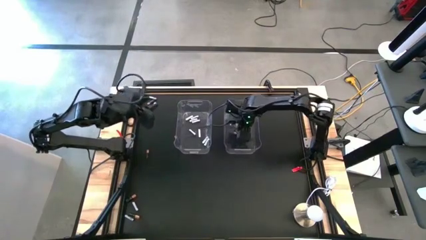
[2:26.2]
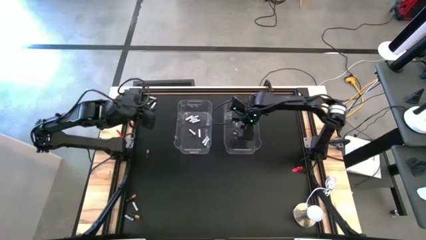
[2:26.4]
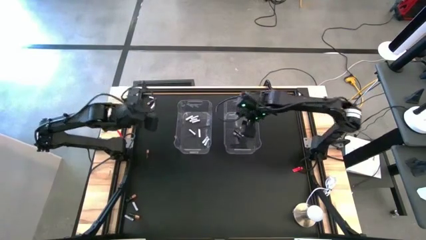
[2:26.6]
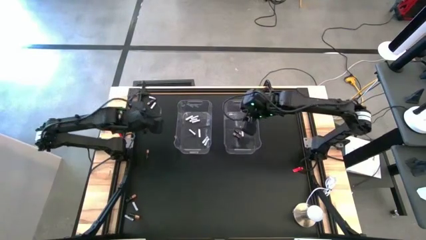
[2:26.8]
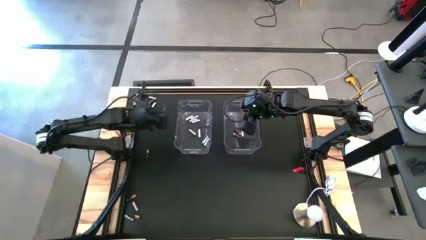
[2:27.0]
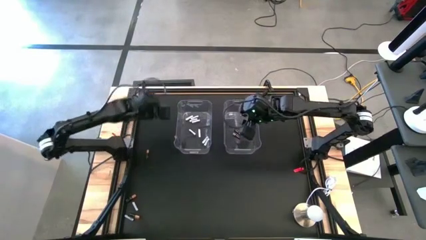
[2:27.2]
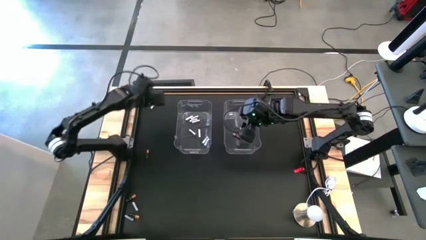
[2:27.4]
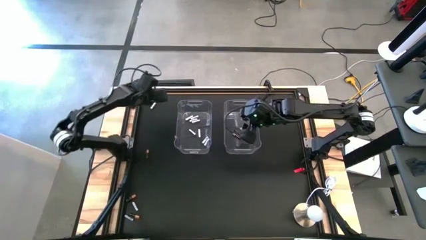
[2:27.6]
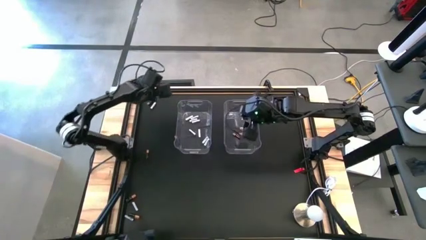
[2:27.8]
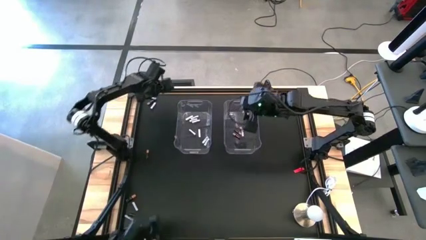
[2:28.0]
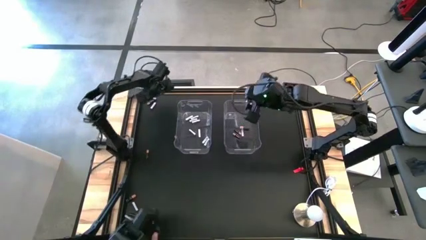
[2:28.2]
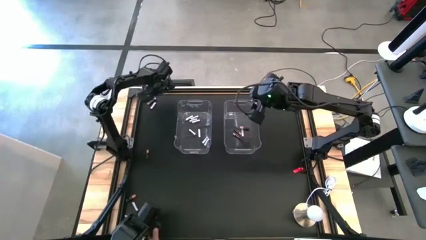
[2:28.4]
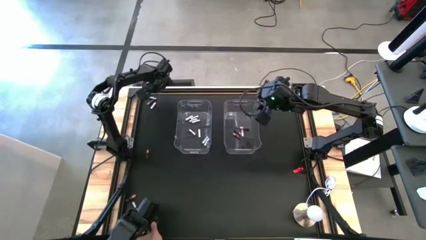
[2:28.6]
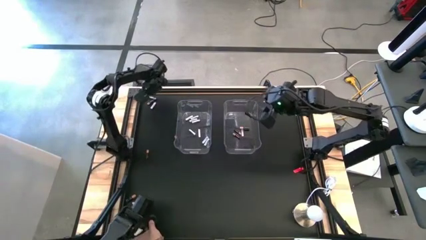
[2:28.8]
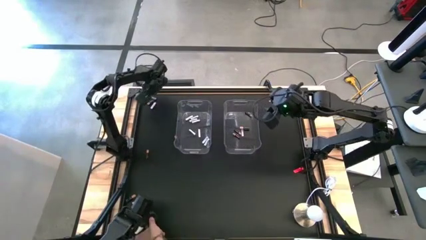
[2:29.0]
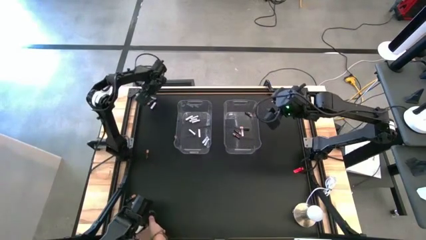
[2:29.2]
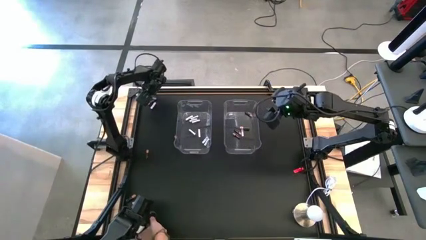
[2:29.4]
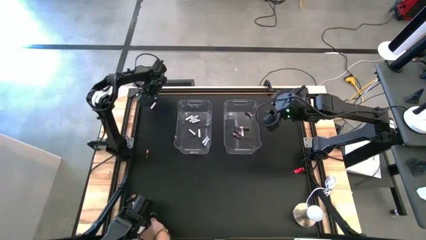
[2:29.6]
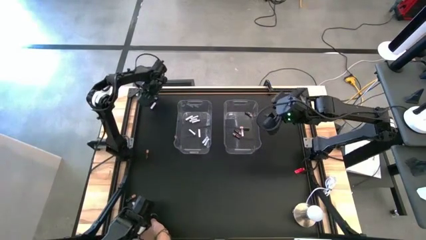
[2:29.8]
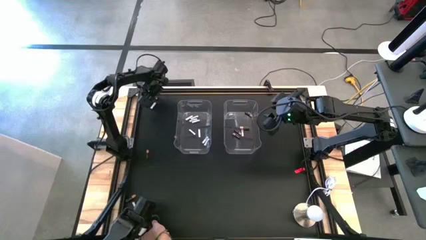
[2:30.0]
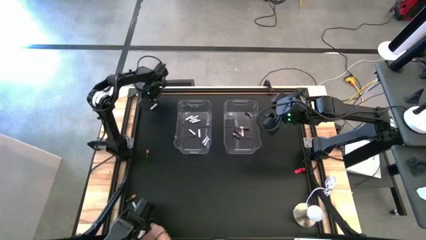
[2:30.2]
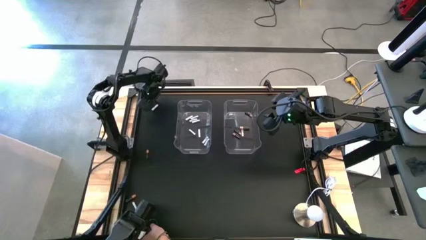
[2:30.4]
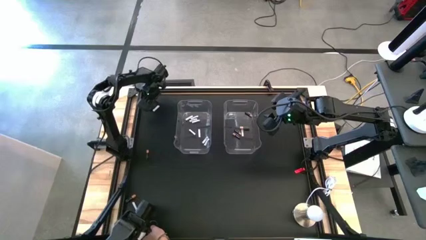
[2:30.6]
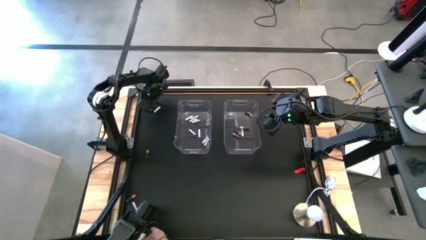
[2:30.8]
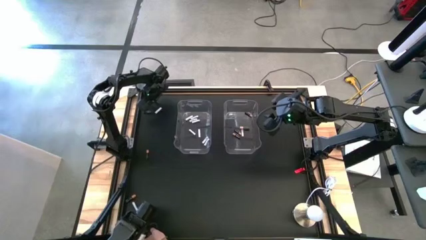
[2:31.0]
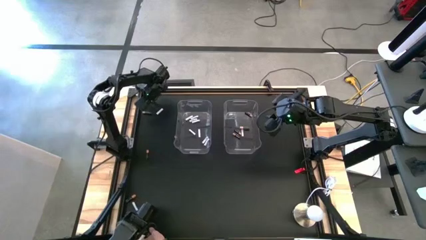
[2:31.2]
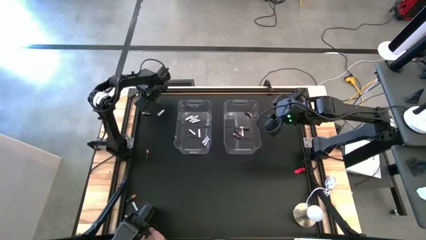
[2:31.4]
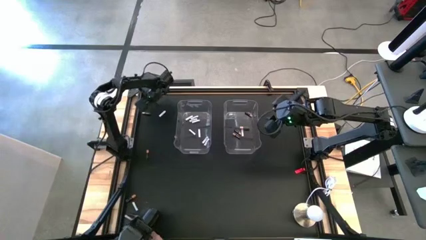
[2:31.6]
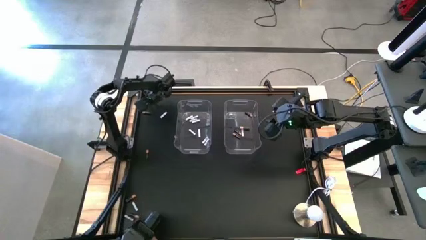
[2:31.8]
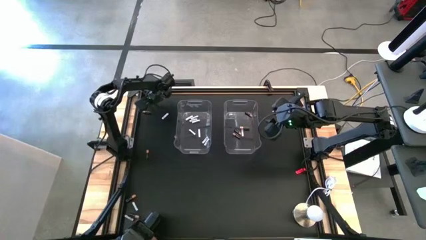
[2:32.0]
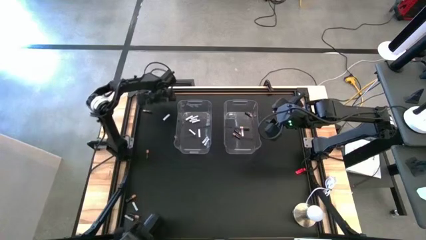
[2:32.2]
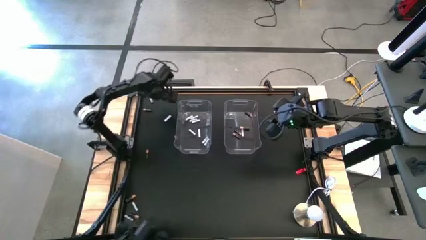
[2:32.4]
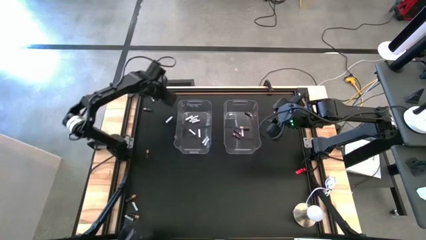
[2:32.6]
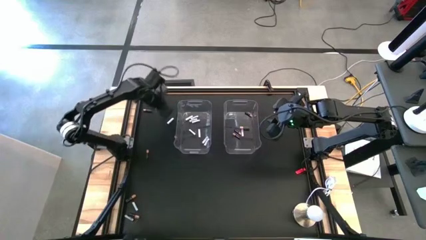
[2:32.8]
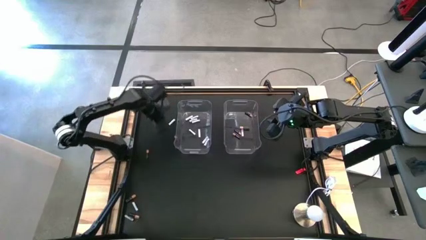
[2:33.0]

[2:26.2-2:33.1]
Task: Sort batteries
Put the white battery into the left transparent bin

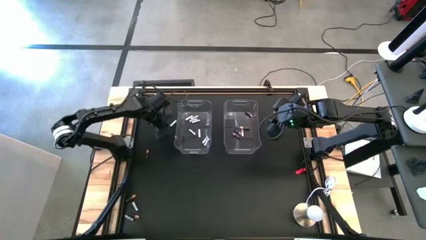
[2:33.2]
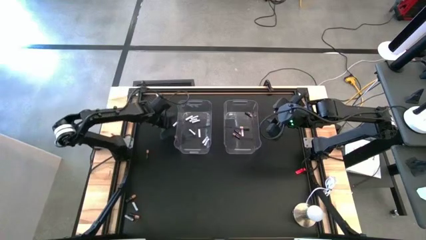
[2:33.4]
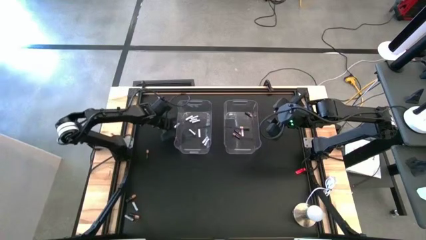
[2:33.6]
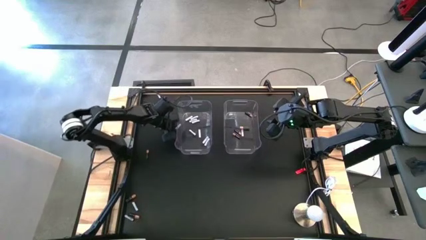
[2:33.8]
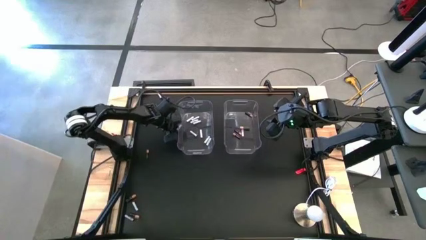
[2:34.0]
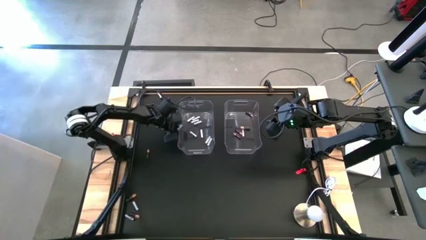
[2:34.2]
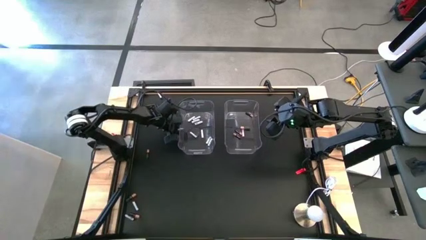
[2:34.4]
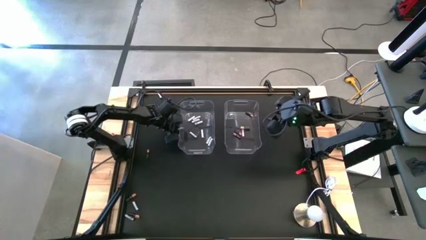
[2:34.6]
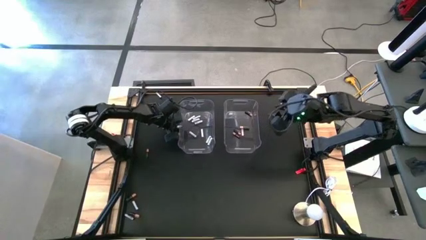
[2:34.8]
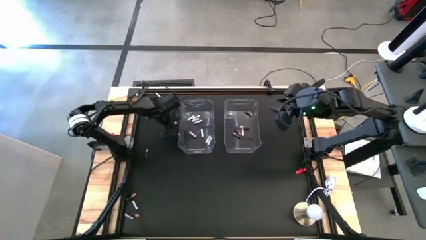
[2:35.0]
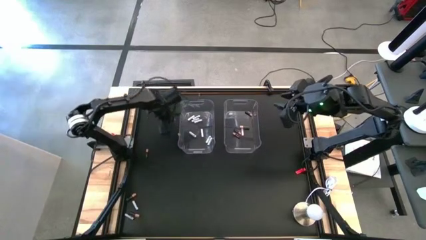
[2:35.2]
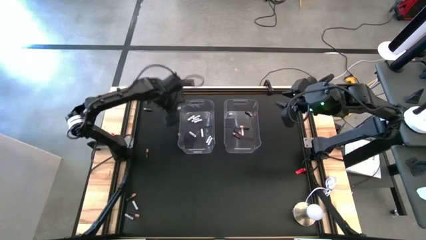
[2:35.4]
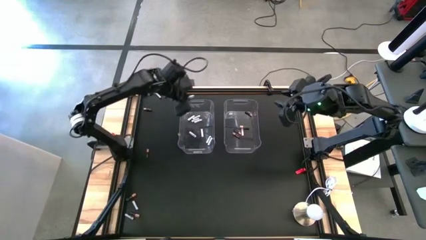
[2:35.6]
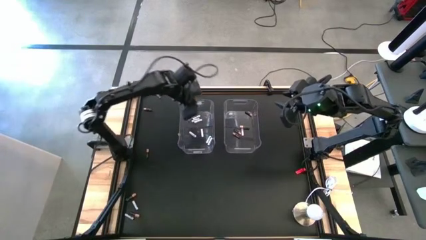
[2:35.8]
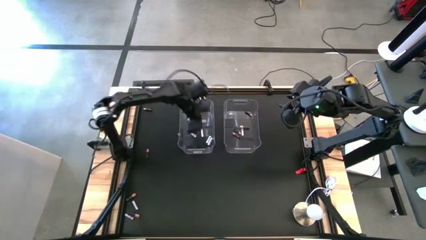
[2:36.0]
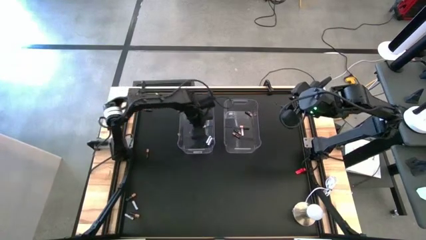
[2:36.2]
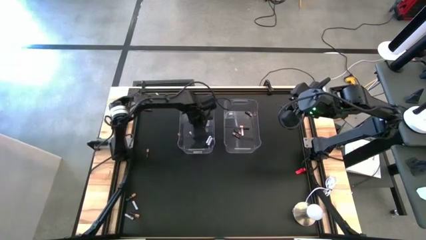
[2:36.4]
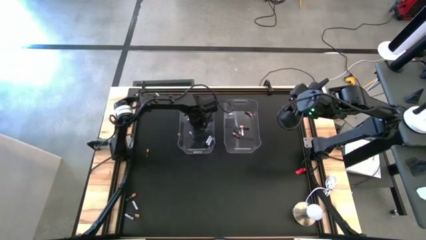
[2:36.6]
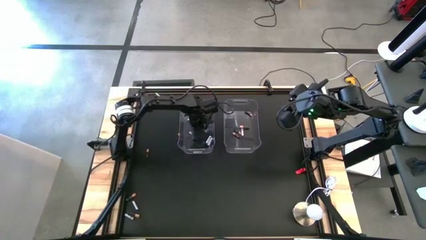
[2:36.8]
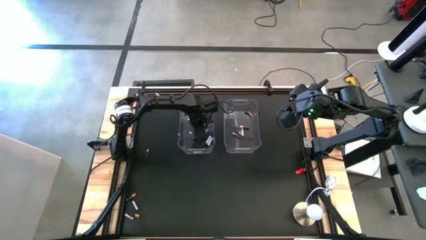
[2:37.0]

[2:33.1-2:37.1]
Put the white battery into the left transparent bin

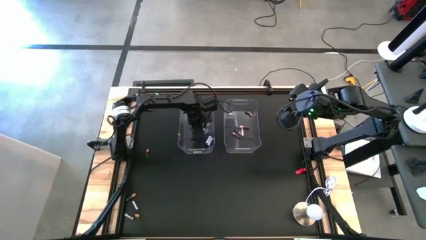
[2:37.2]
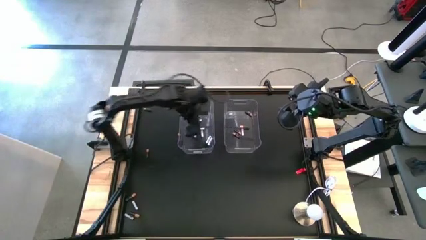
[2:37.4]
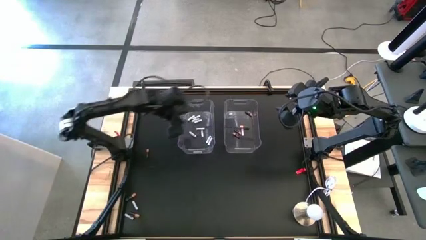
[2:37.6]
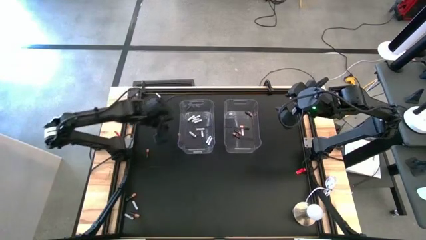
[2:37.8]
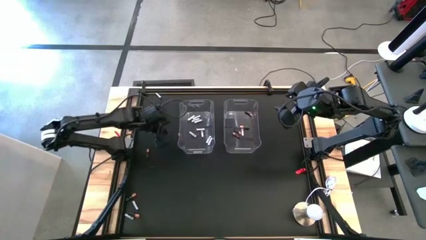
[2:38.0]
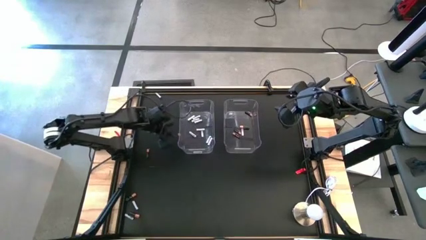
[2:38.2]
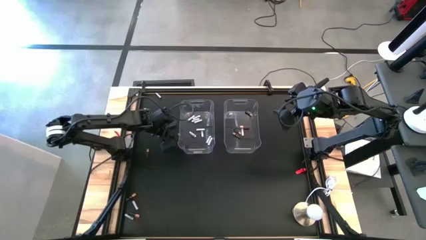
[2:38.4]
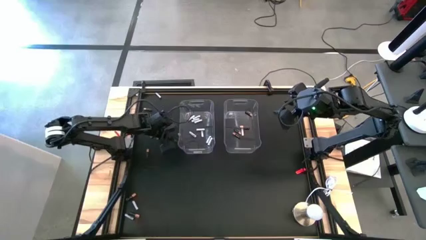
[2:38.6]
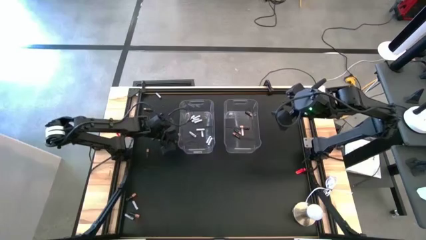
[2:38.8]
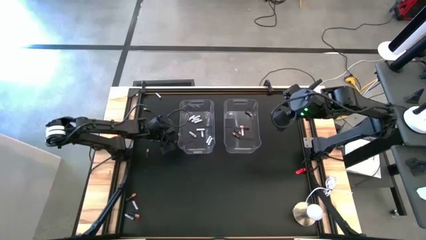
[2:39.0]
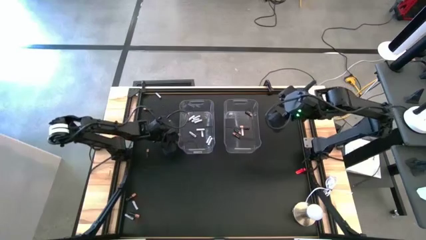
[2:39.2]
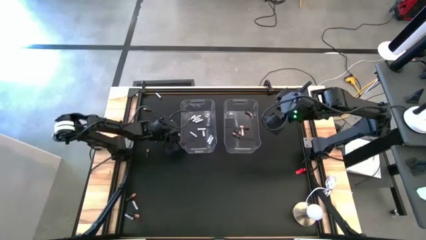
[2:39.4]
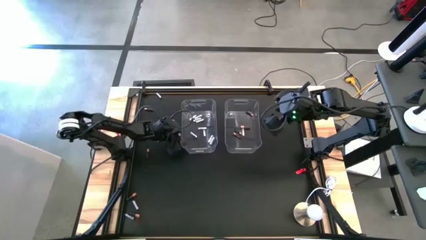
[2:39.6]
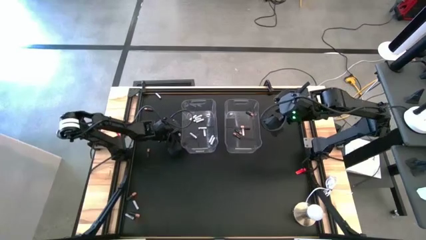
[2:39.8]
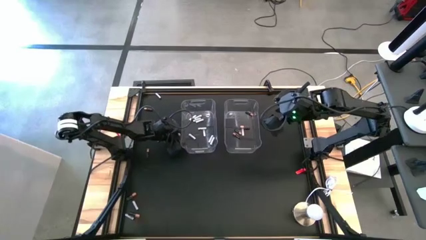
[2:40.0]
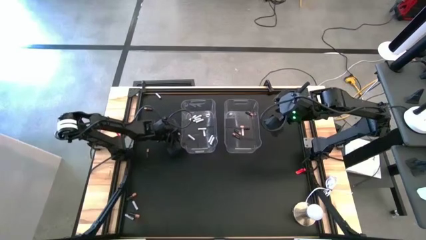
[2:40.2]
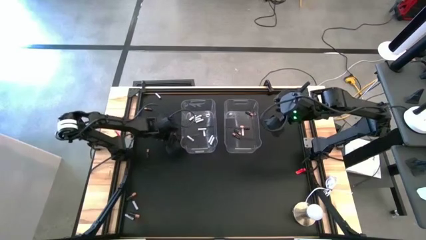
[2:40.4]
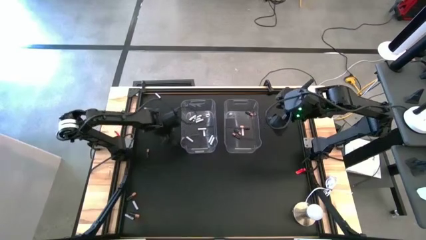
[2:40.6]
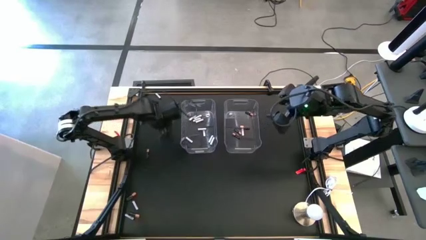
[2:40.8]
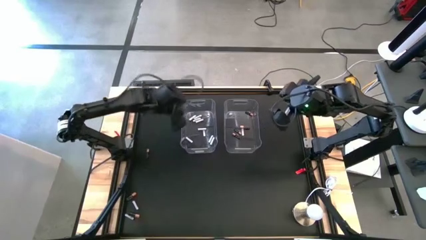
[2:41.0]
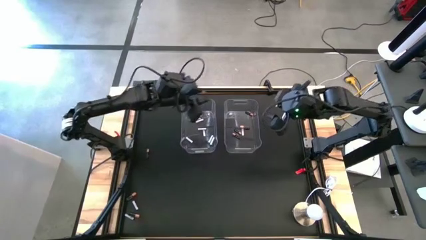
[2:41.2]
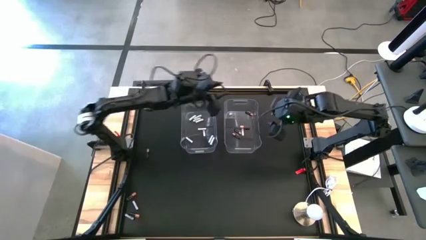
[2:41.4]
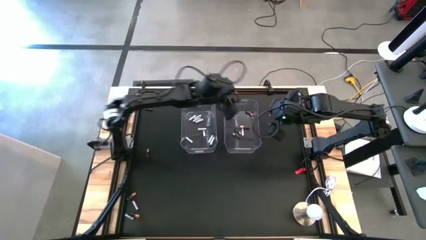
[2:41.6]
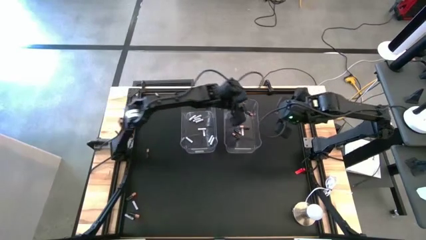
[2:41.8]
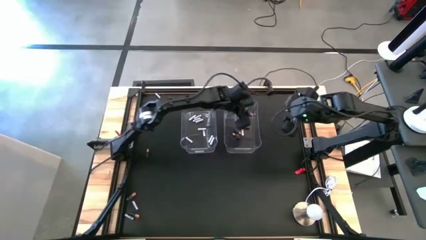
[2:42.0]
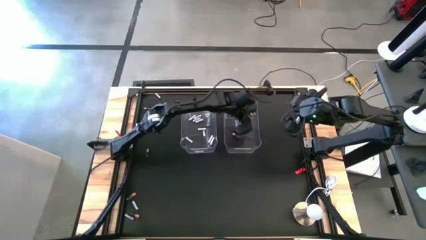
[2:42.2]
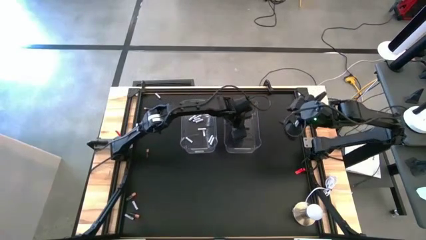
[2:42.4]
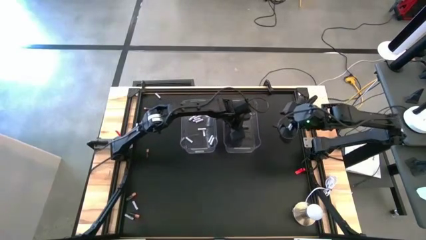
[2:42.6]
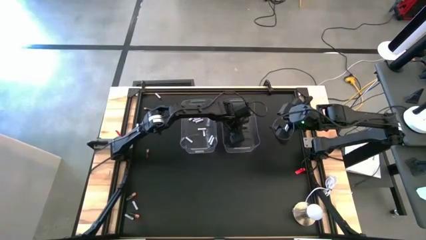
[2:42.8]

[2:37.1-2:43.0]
Put the black battery into the right transparent bin
